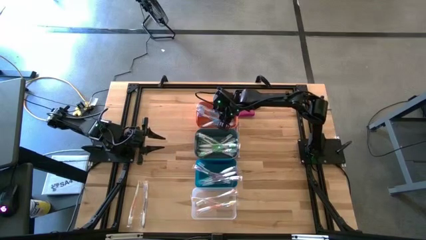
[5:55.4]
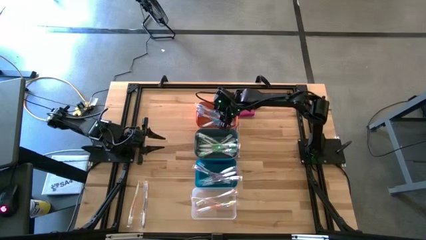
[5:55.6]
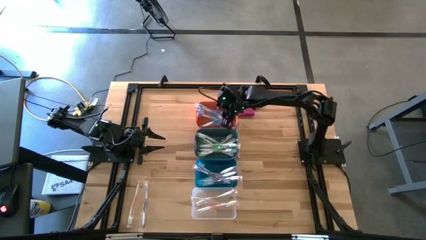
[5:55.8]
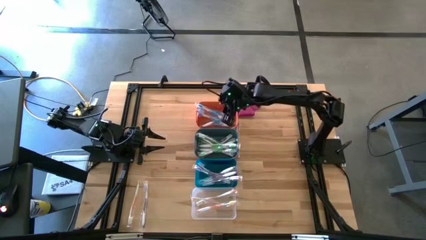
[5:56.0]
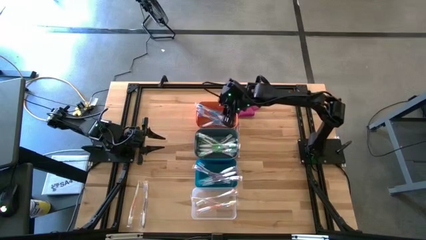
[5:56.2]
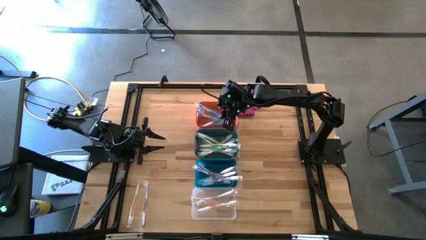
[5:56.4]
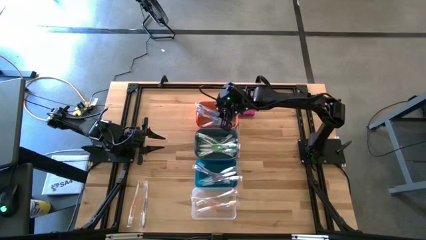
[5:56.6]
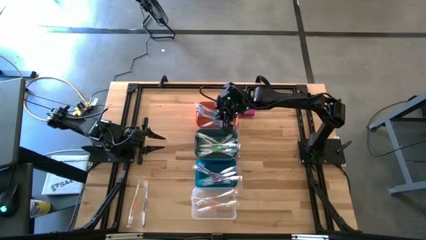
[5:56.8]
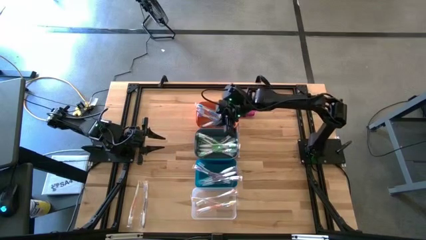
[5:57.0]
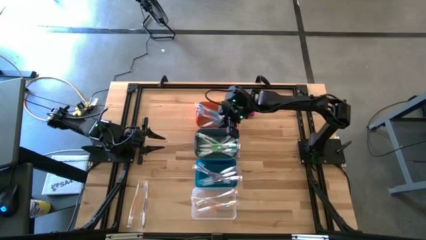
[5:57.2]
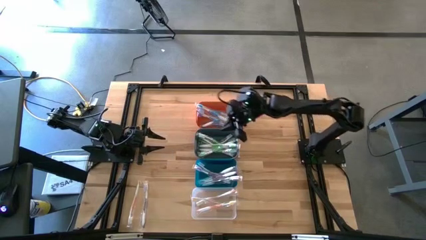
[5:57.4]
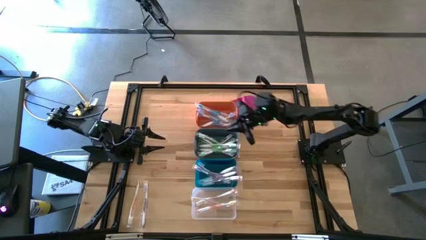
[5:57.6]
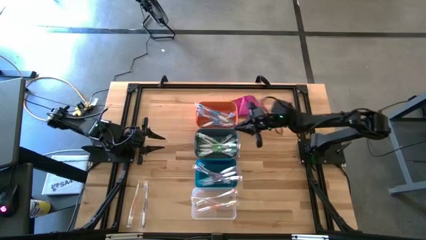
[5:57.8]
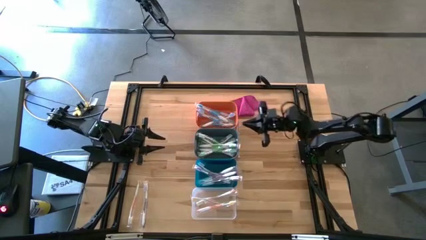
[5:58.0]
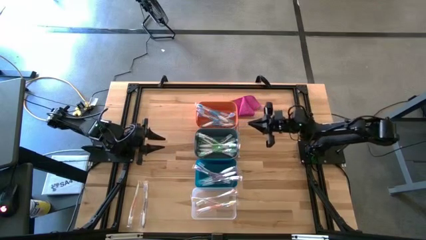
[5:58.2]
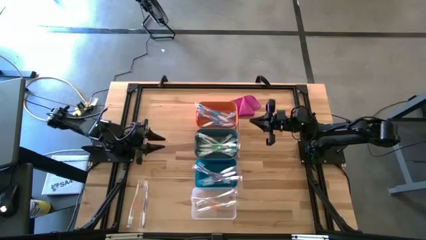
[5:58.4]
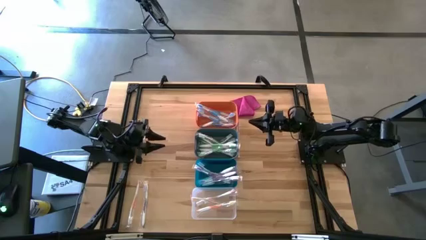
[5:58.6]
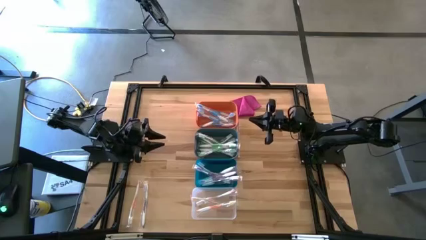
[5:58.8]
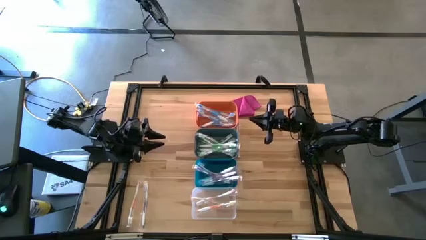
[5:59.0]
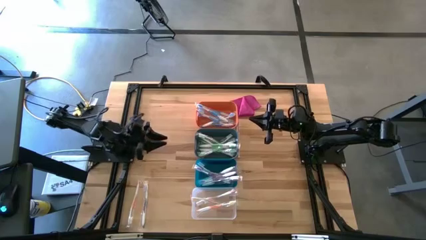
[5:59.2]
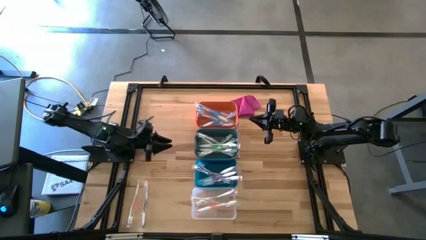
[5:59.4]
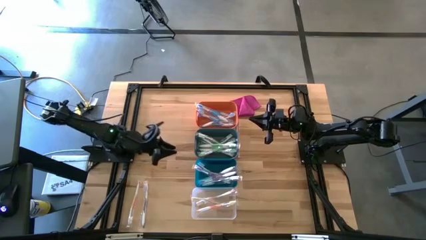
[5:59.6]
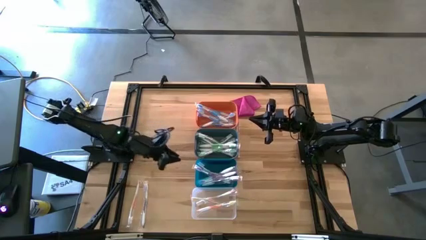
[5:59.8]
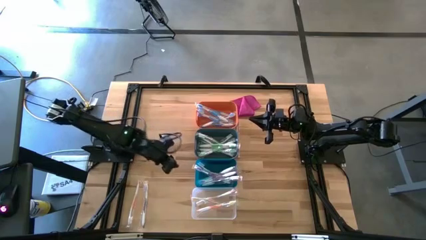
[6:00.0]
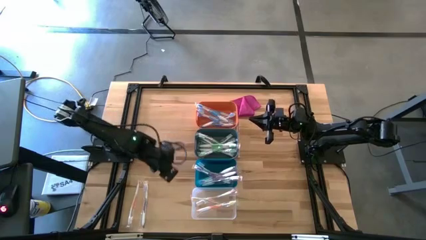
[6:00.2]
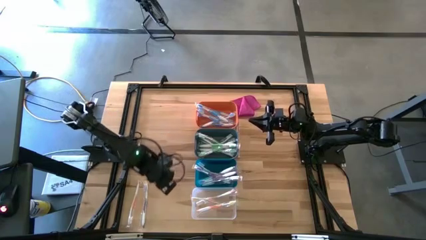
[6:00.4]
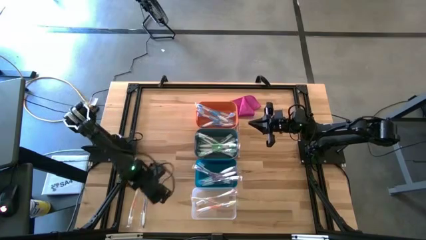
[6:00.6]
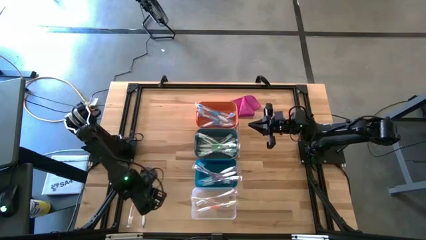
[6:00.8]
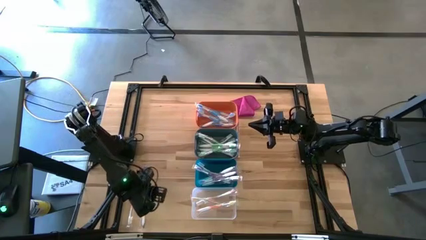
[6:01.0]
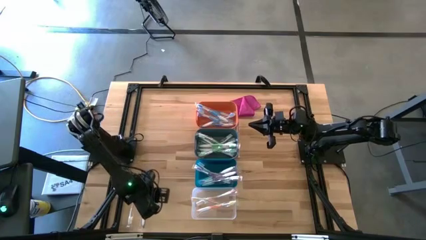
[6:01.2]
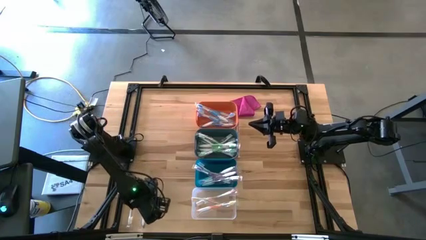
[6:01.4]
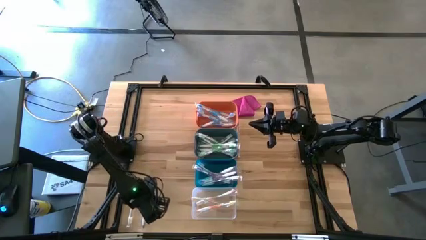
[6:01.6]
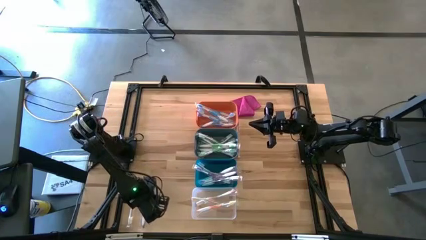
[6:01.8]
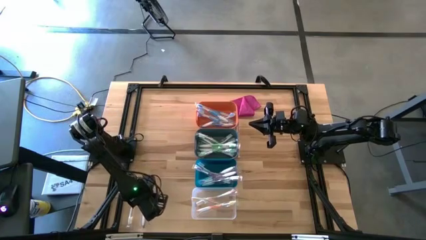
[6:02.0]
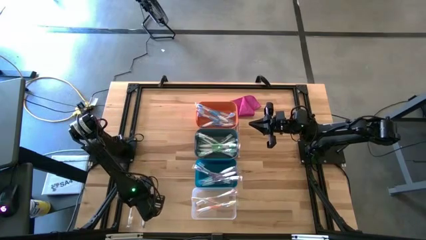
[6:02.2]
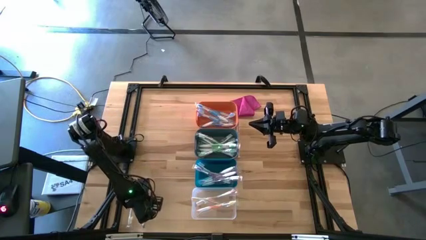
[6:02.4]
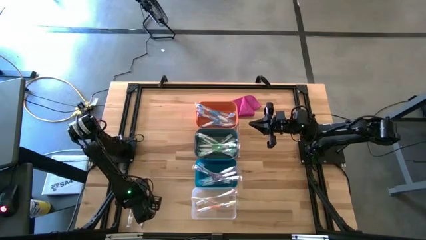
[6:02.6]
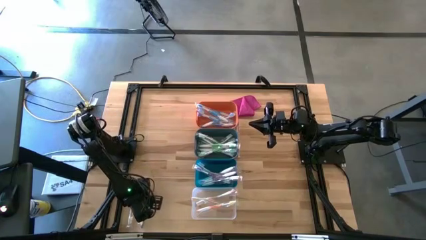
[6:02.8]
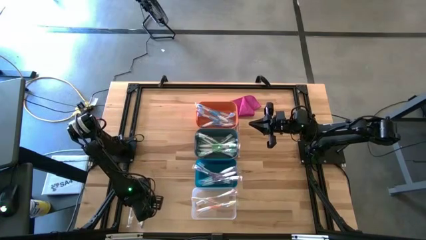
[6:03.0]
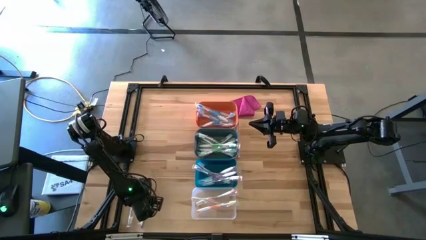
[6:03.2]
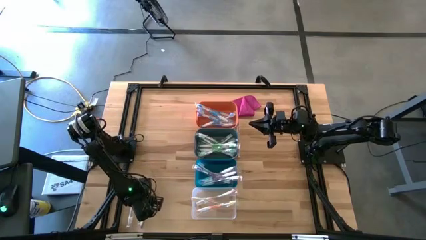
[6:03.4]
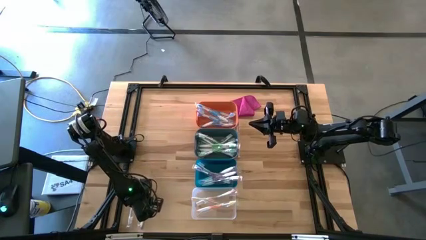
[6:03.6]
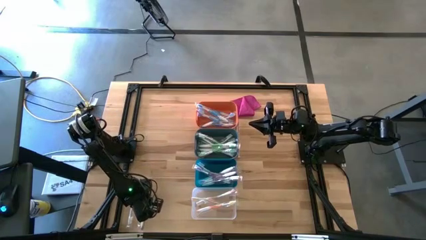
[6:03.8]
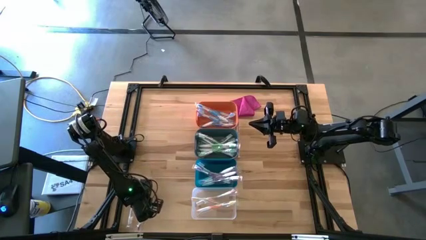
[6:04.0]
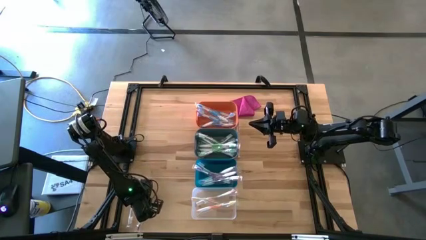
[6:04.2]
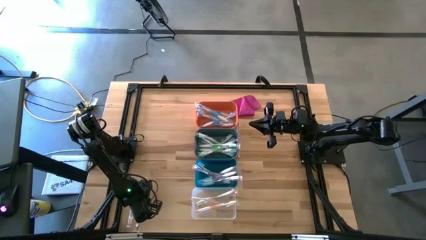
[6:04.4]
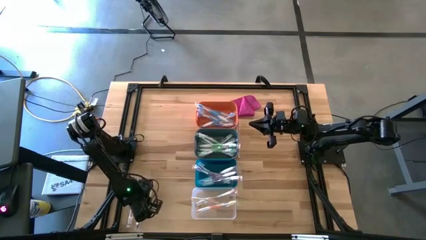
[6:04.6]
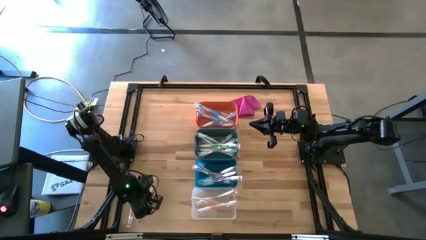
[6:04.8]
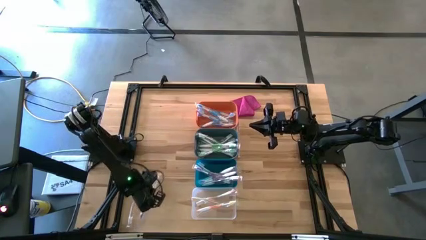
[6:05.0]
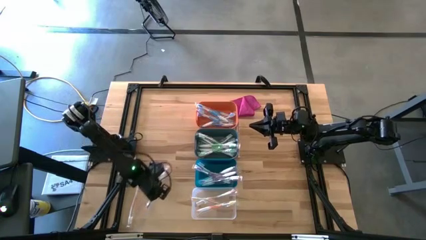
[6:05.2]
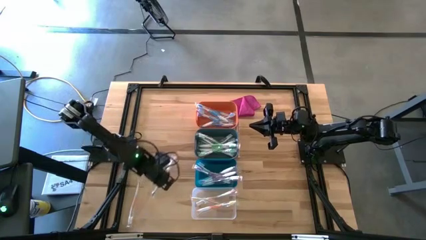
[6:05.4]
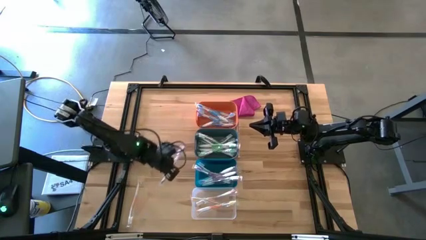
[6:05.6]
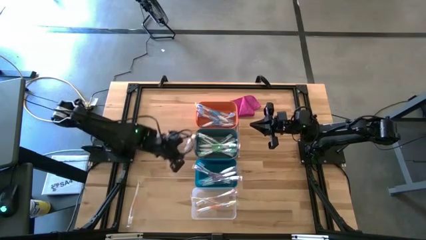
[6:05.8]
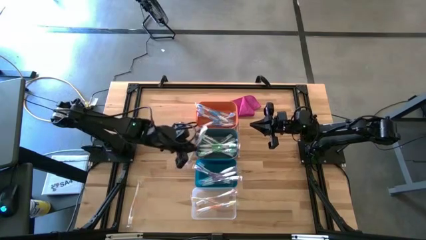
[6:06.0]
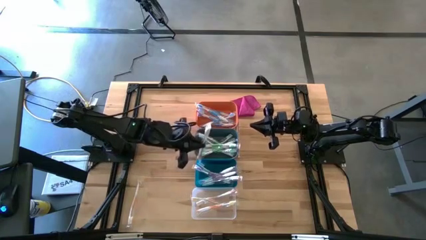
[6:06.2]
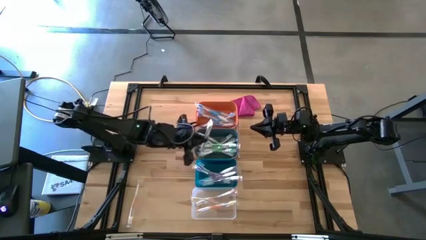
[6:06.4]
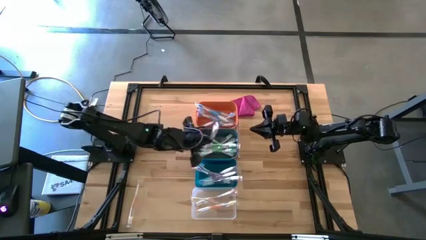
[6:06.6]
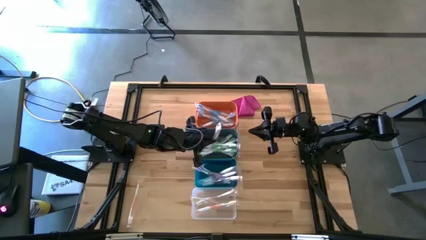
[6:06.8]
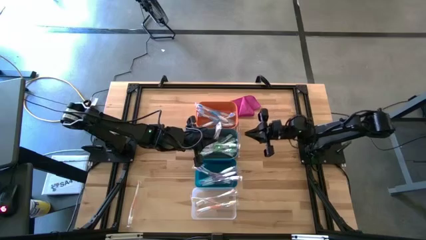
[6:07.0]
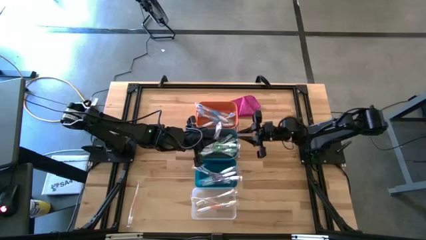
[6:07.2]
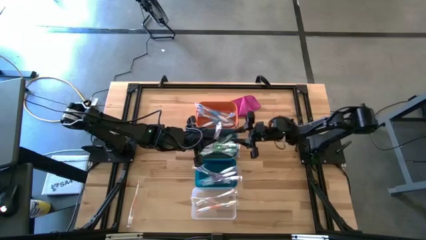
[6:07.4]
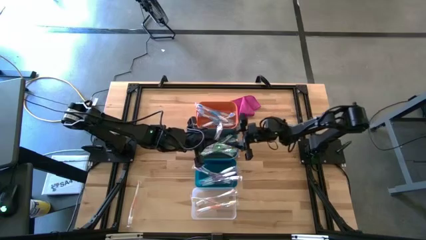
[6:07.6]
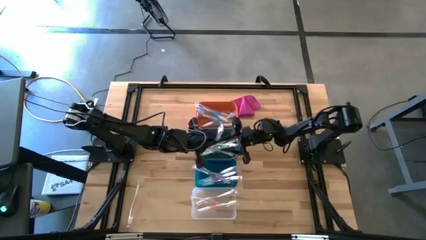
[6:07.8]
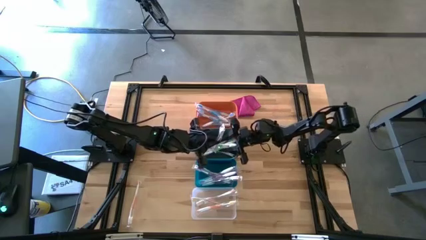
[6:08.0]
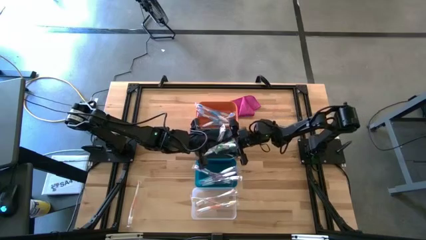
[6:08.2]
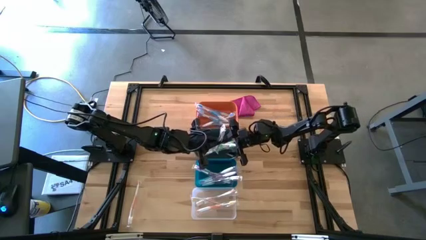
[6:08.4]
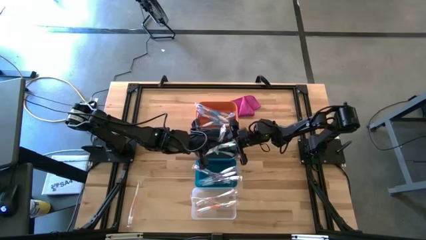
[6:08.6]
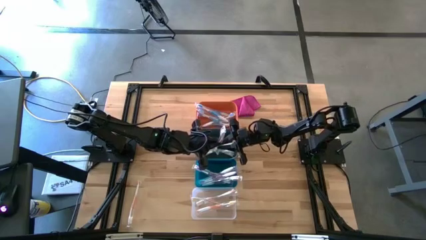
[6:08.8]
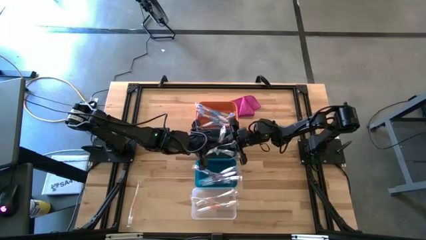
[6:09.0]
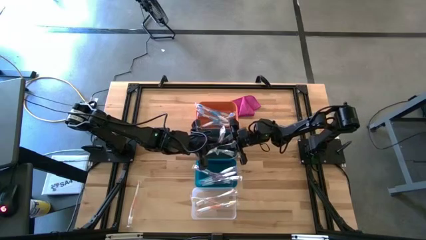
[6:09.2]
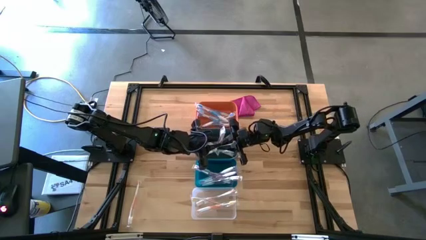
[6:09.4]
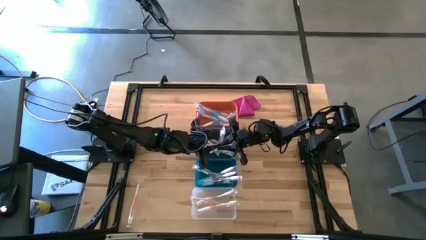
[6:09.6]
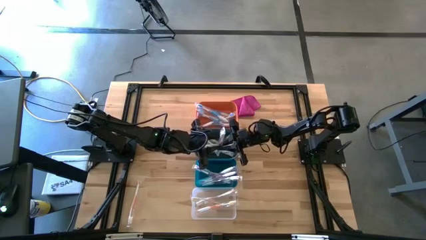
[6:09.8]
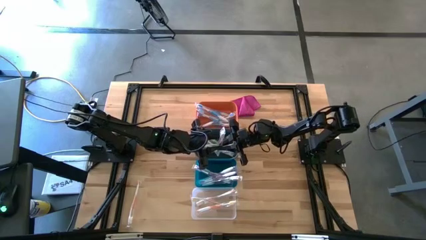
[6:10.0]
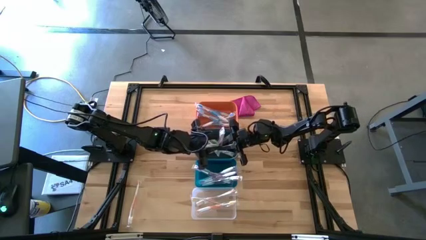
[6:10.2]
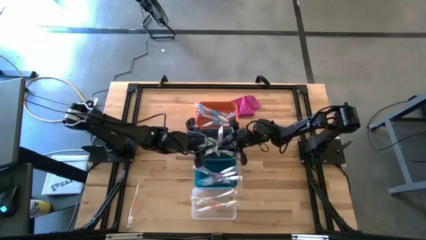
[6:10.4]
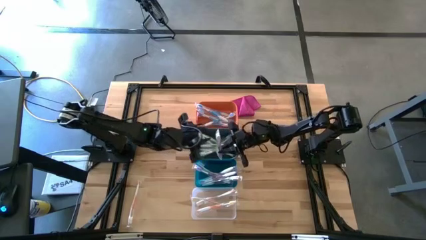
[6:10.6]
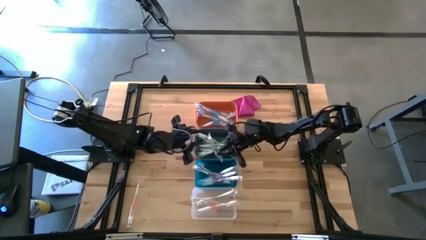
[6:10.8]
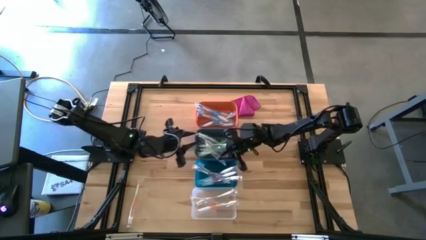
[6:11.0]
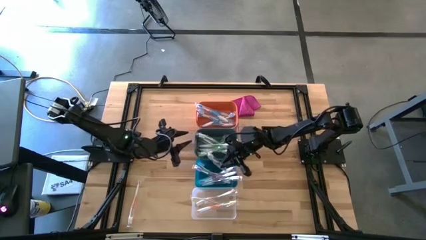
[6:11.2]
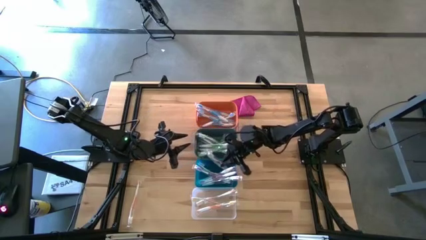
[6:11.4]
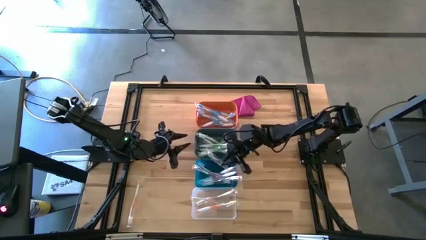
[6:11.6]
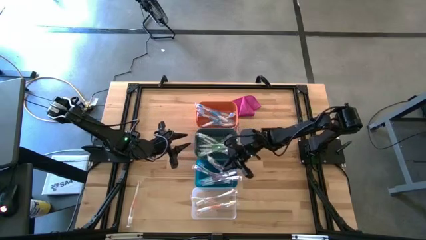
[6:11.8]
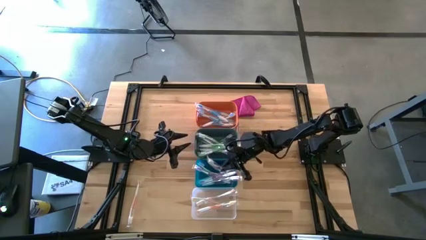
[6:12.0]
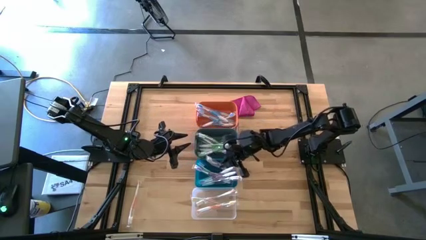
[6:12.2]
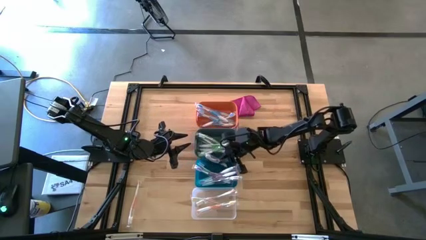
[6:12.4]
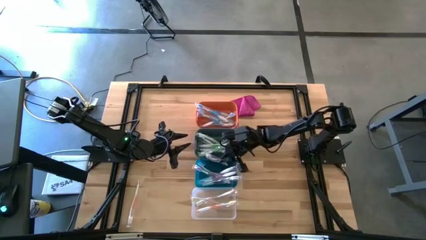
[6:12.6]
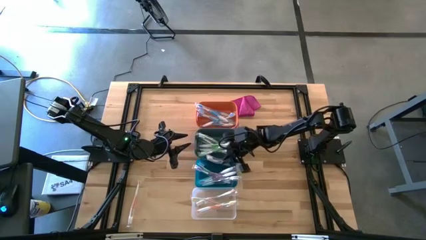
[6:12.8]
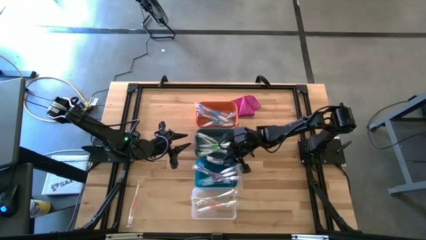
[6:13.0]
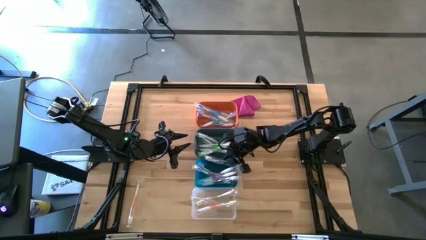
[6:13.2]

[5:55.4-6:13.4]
Task: Pick & Place Toothbrushes
Put the purple toothbrush into the blue bin
